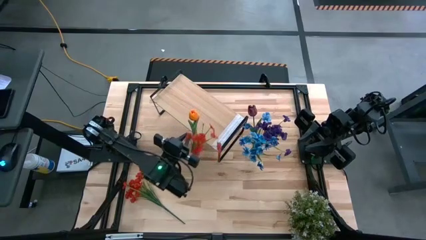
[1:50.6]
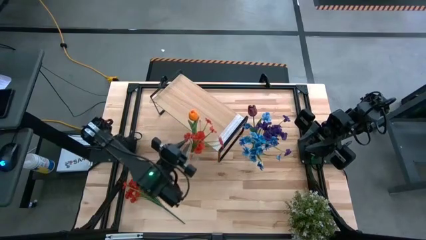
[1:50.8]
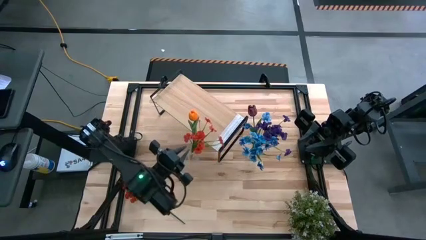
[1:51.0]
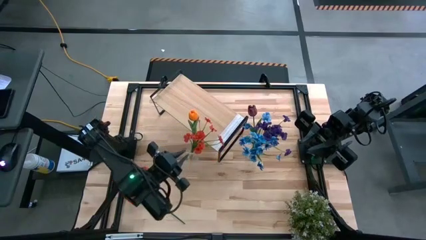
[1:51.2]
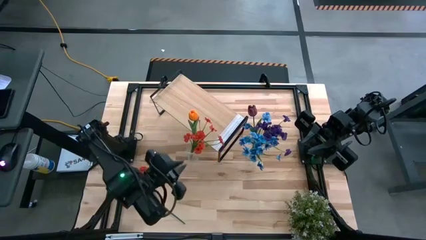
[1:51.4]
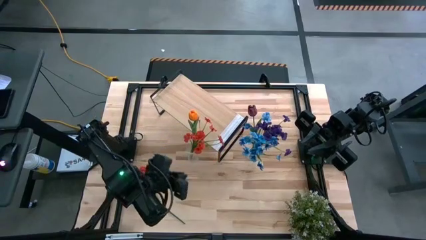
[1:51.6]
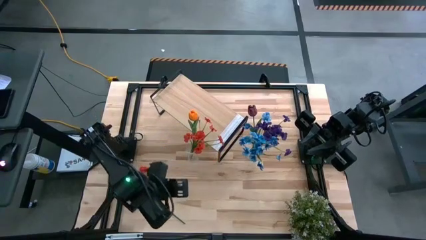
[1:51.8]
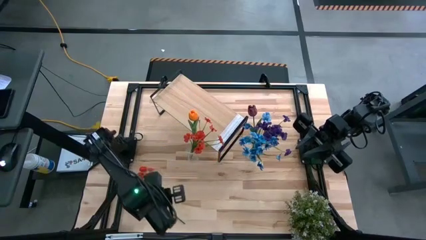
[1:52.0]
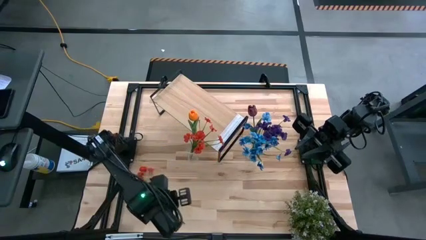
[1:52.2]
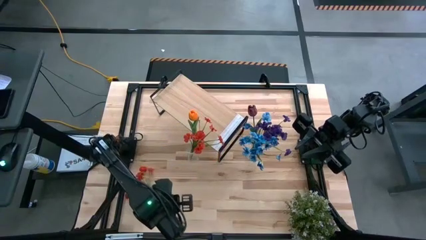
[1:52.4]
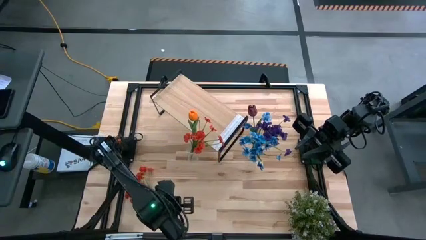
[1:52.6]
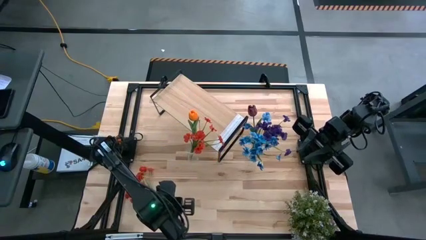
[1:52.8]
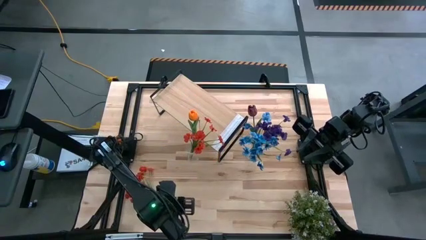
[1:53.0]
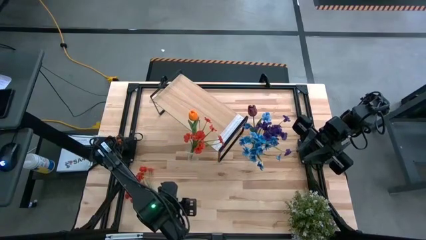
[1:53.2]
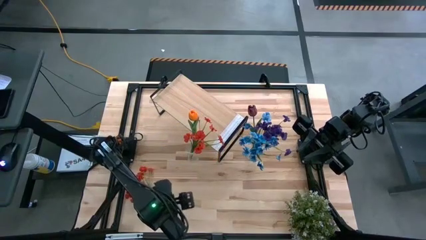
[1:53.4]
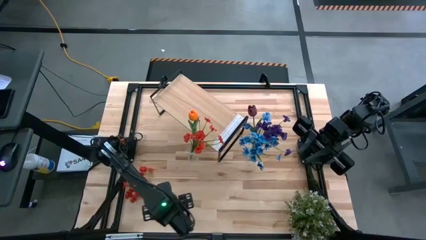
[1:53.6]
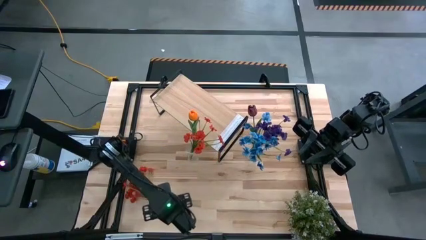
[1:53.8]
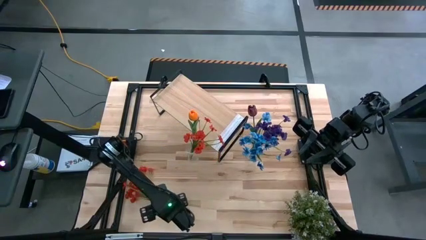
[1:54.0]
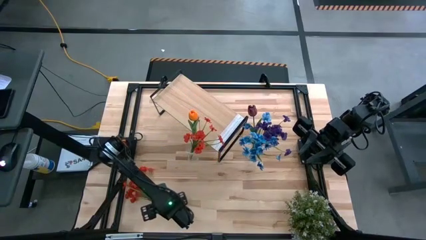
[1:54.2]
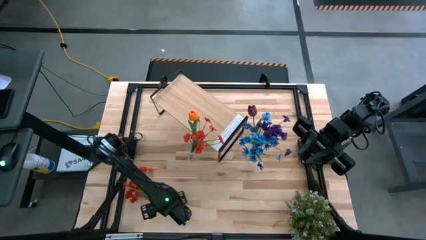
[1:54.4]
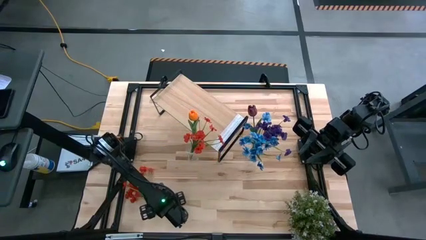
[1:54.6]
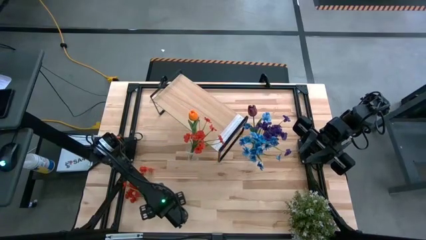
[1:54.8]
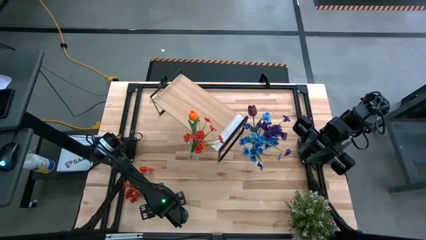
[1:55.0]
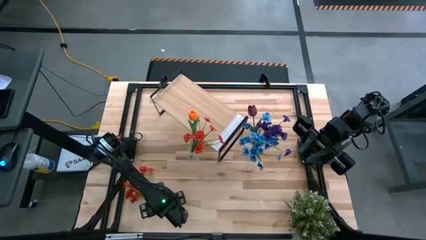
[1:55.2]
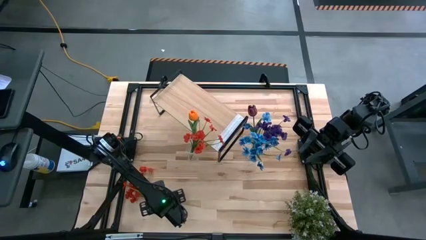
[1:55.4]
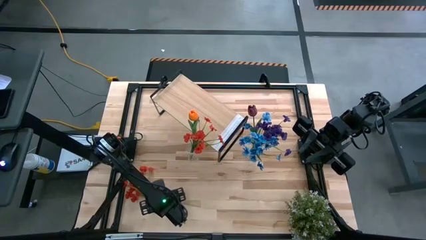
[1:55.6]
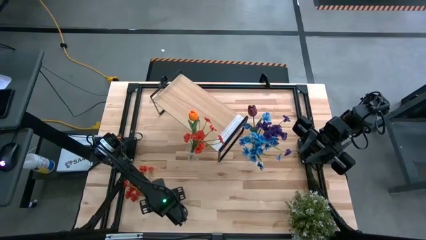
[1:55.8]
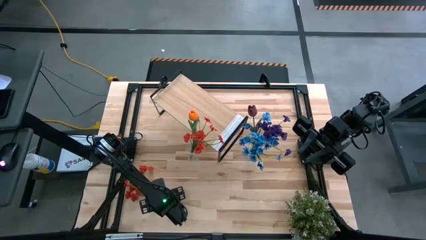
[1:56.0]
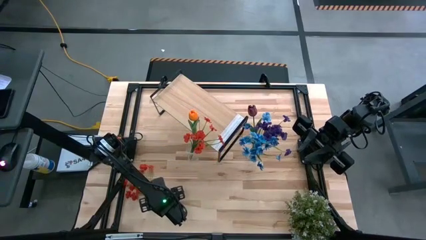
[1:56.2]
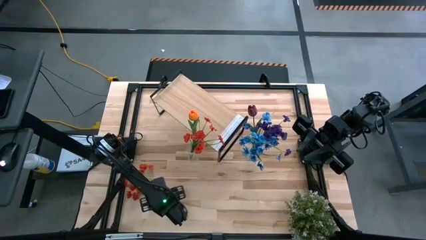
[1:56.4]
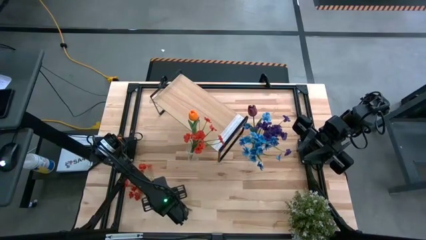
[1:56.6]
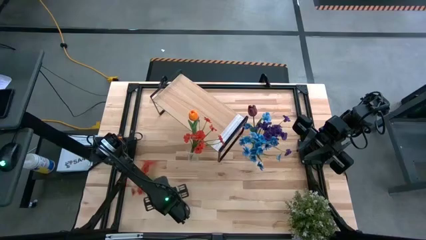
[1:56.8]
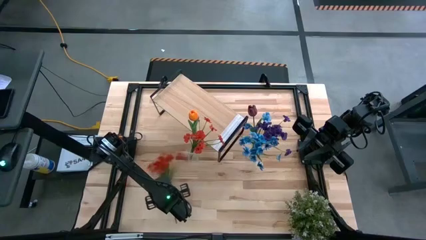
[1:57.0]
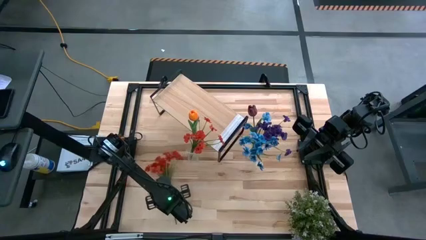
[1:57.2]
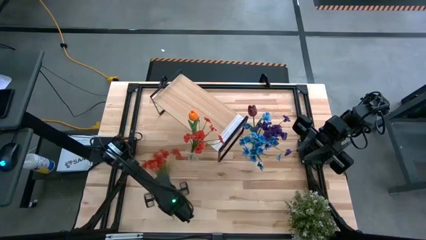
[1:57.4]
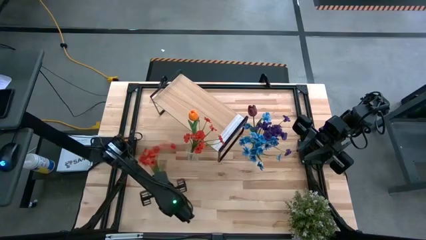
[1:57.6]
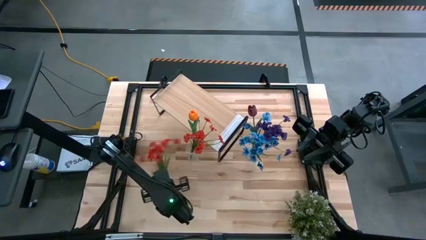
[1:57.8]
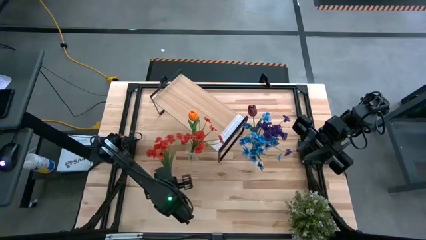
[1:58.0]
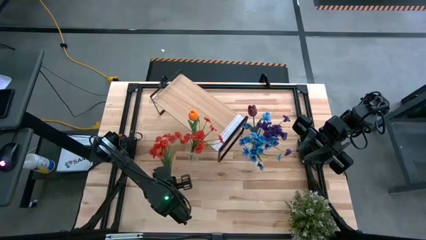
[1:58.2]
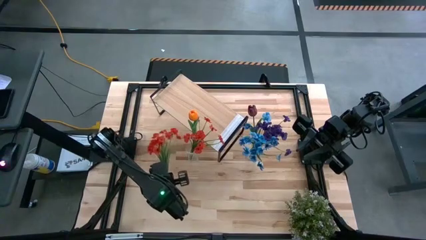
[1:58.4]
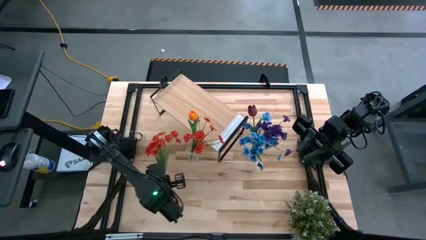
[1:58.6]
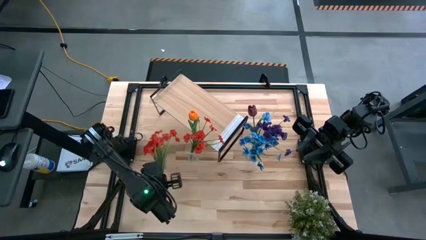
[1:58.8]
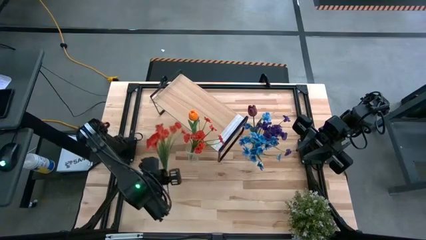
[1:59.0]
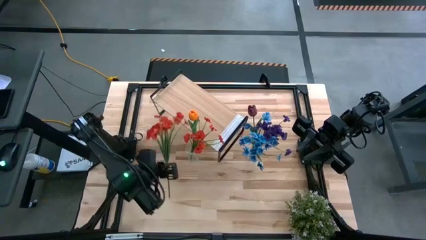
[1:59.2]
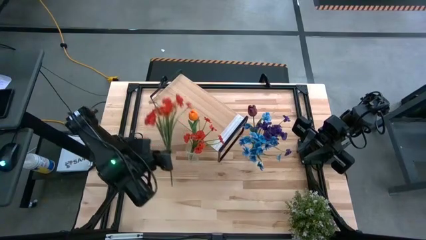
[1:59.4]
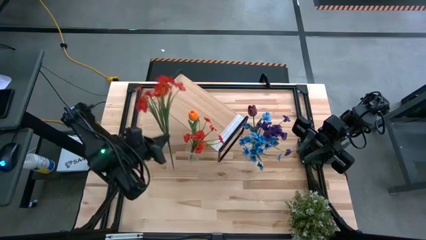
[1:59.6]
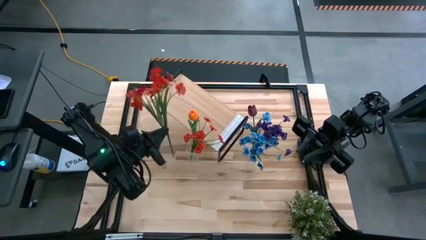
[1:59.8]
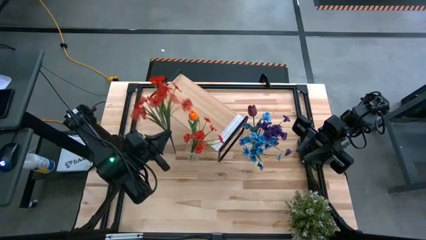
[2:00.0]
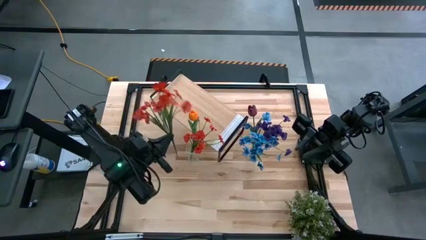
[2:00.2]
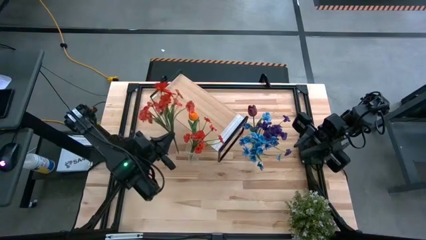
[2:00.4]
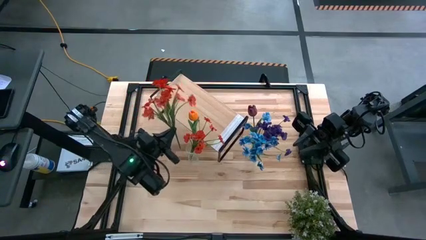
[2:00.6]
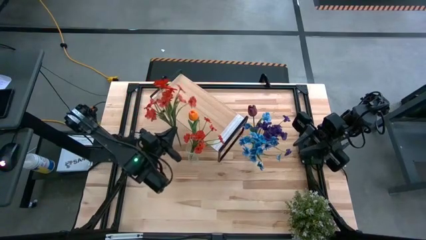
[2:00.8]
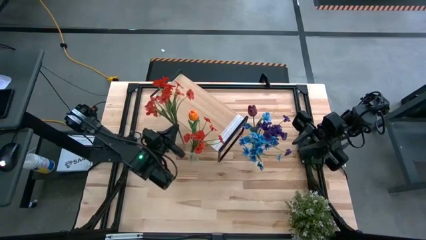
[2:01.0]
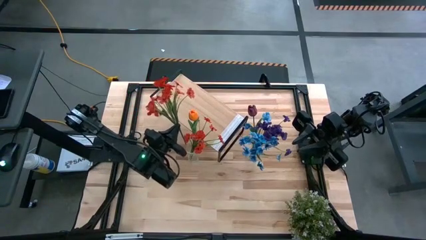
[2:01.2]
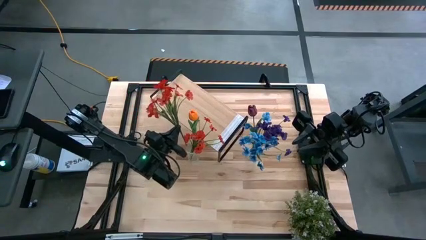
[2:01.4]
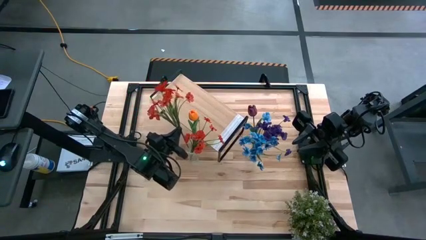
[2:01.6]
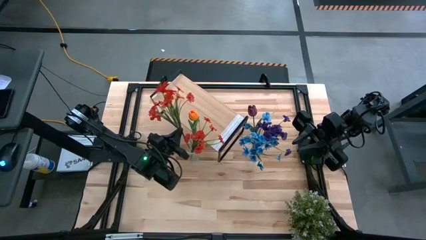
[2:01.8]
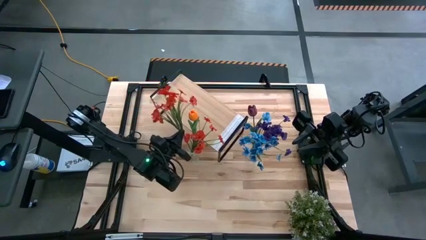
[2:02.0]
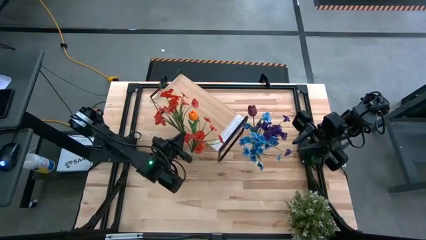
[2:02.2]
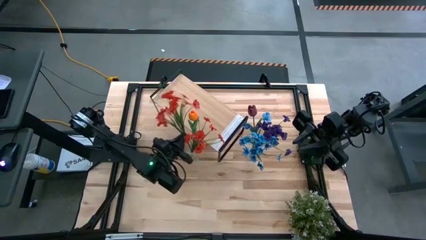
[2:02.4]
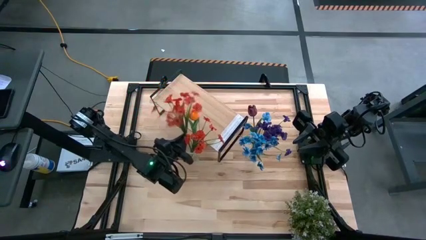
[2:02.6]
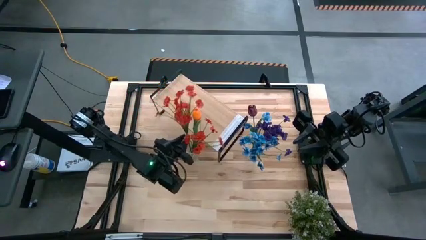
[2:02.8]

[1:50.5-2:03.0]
Task: Pick and place flowers into a vace then onto a shelf
Put the red flowers into the left transparent flower vase

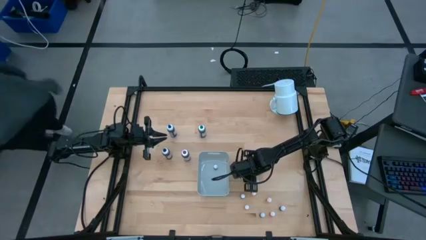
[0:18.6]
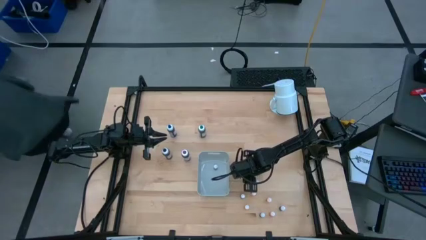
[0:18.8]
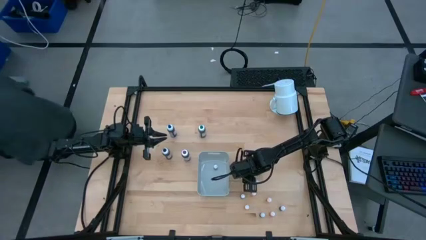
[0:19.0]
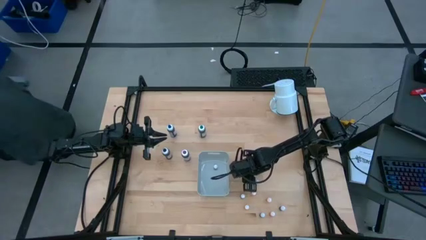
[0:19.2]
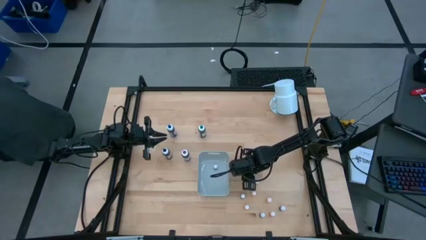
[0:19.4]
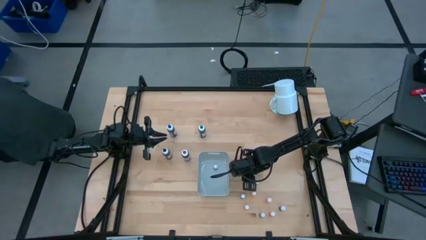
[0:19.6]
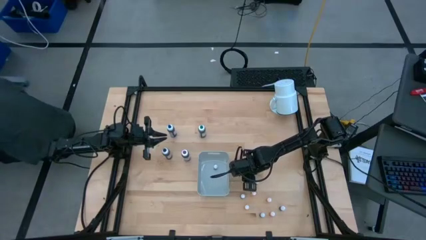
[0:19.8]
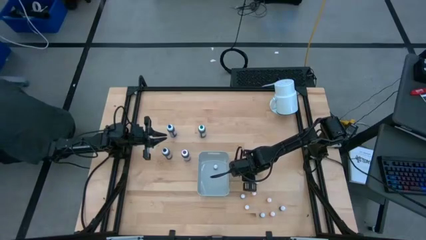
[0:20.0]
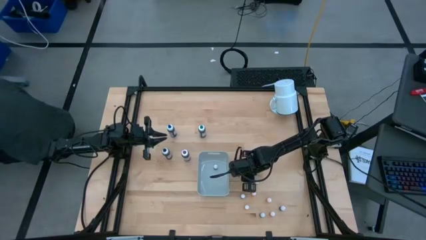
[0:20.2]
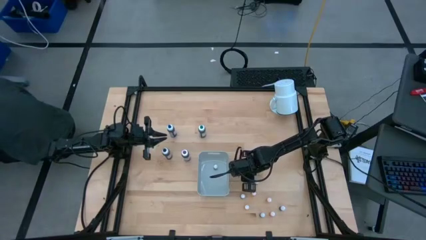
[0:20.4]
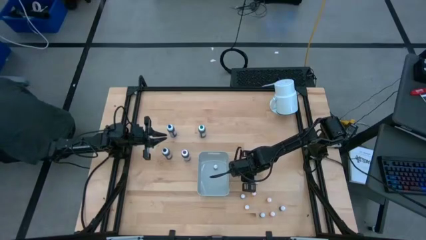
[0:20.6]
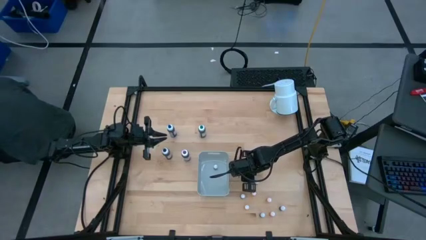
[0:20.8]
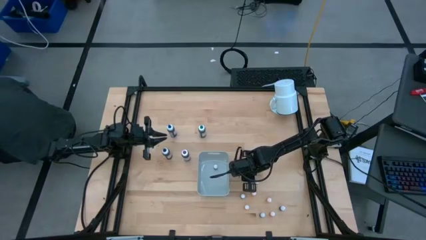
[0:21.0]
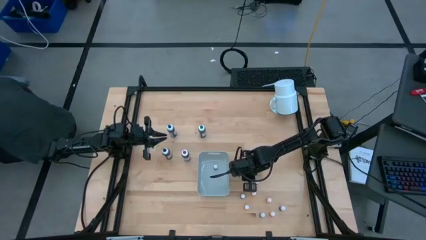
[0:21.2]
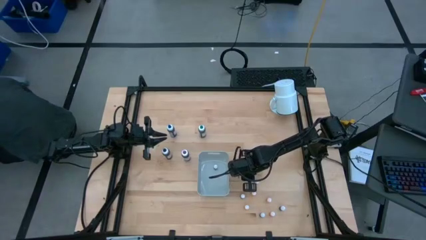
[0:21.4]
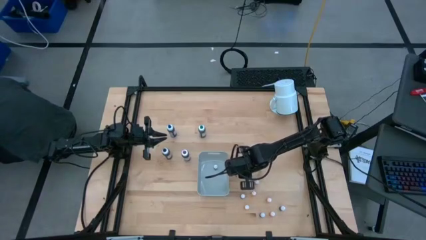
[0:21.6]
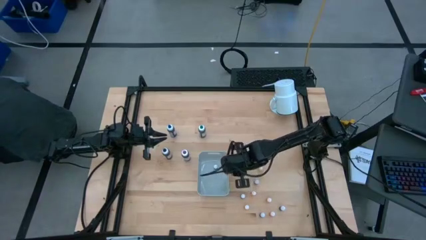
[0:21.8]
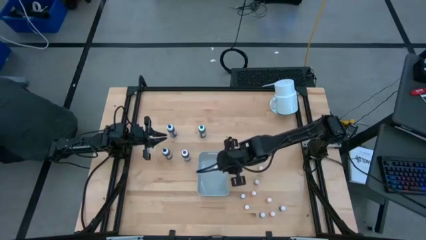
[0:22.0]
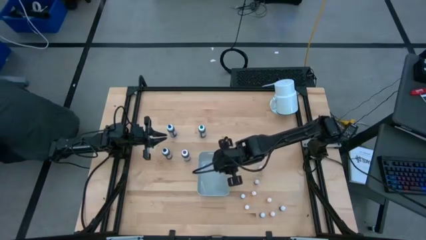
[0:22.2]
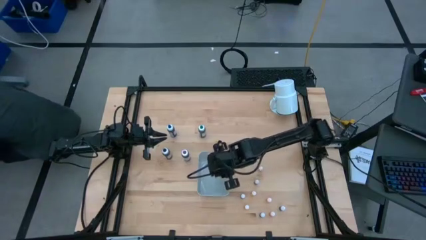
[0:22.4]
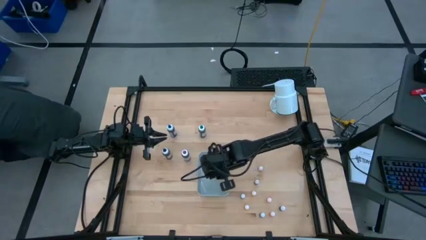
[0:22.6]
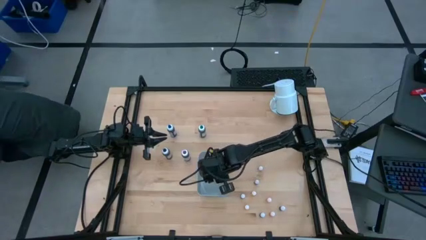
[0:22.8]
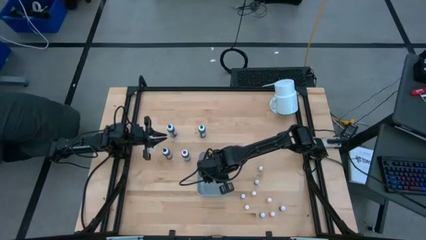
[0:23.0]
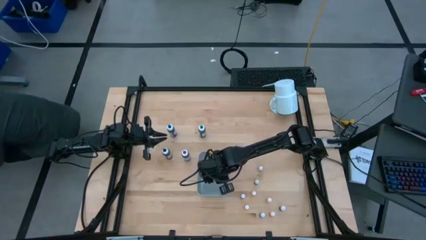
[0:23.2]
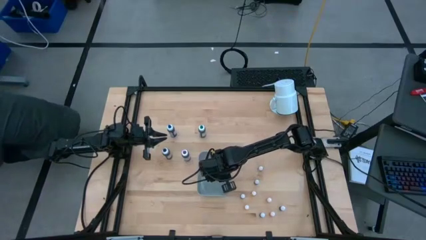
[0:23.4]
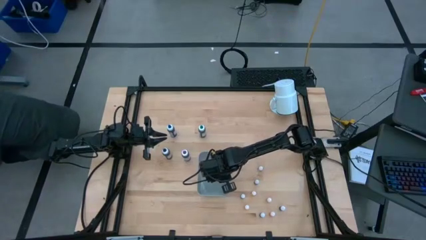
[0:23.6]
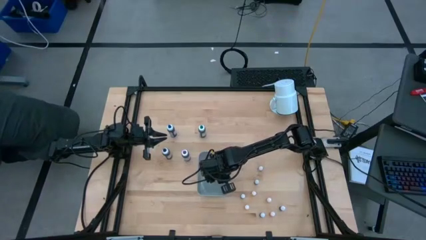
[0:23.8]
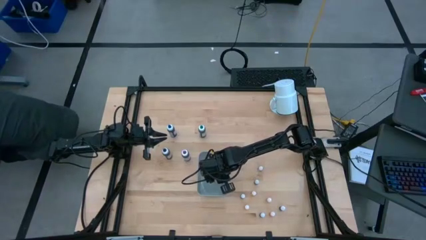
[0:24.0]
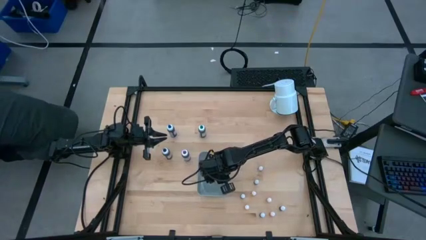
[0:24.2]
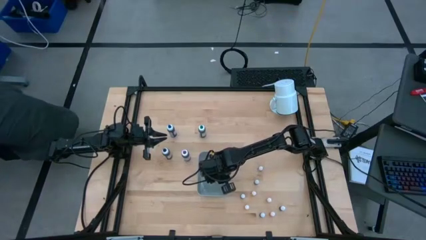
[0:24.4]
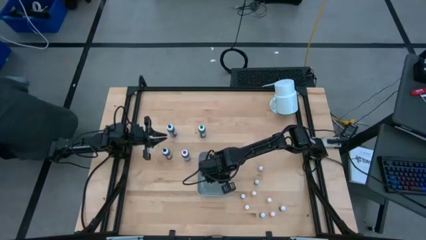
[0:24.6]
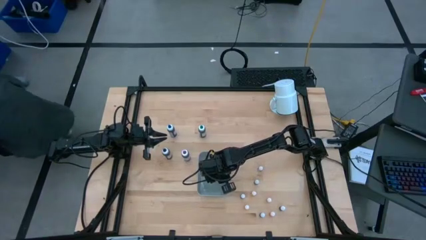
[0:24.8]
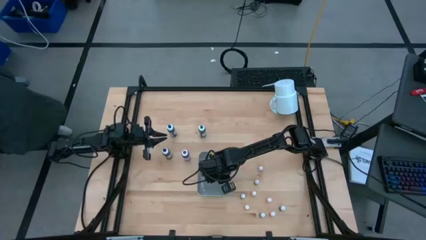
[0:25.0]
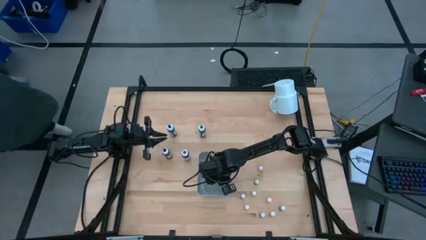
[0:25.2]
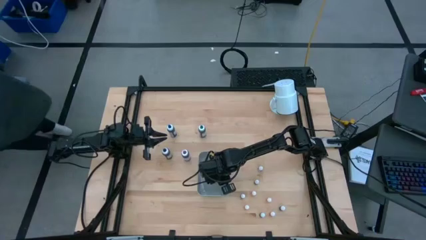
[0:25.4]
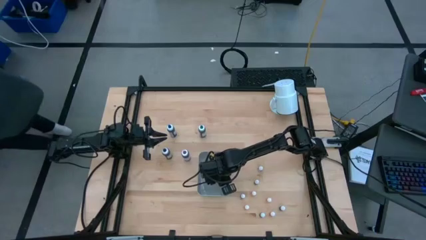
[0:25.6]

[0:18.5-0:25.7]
Task: Pick & Place food coloring
Put the small blue food coloring bottle into the white bin
